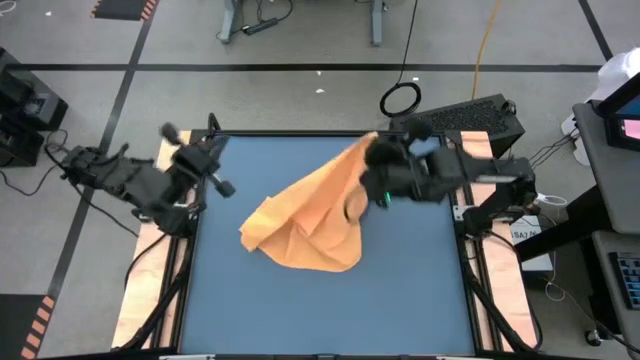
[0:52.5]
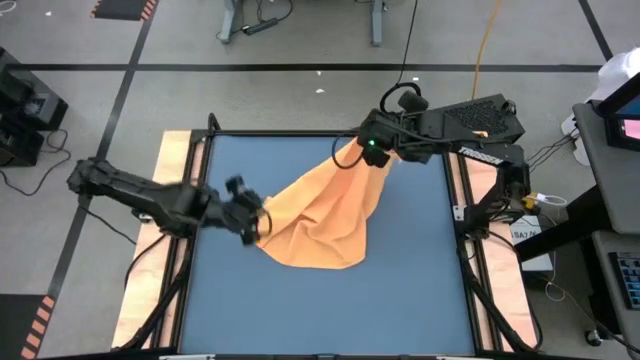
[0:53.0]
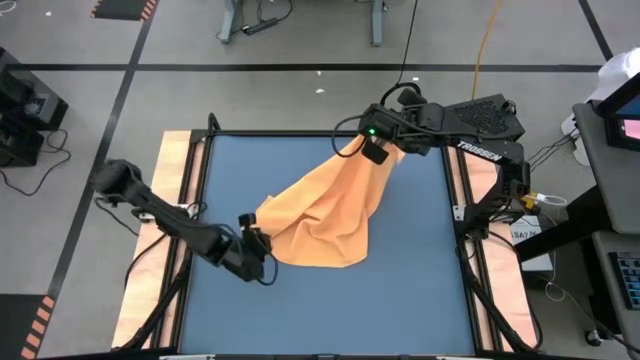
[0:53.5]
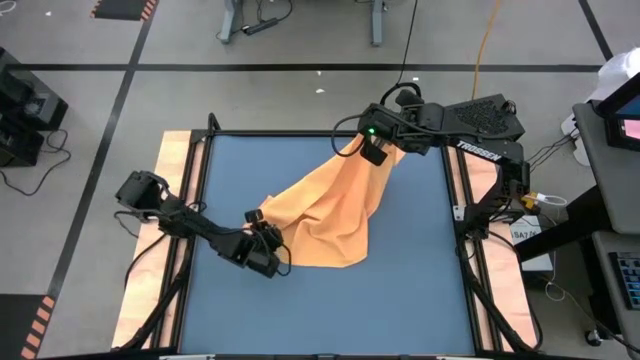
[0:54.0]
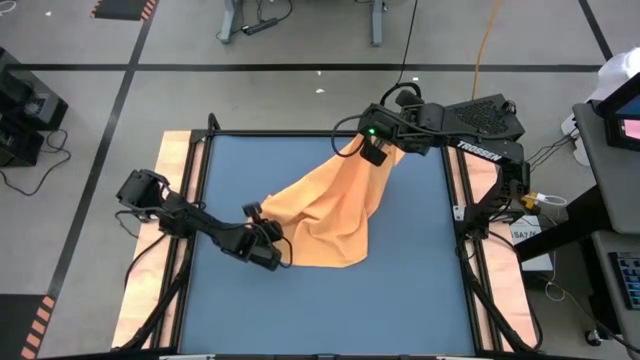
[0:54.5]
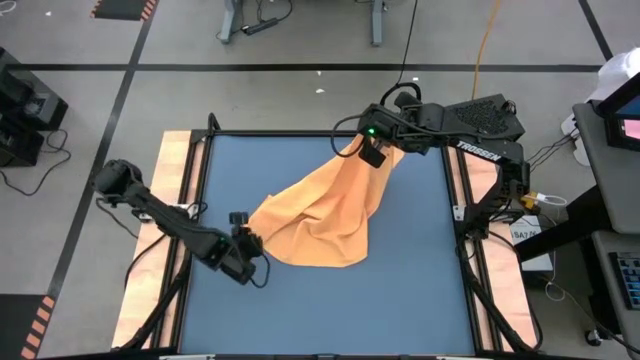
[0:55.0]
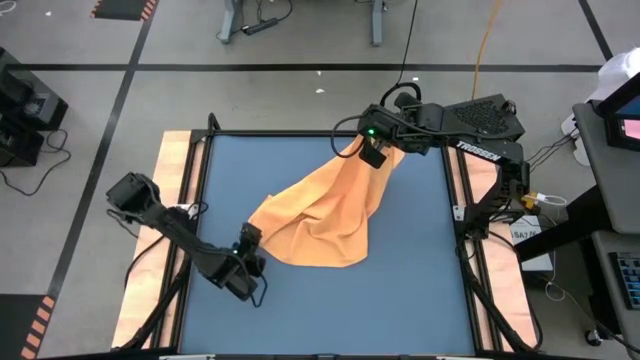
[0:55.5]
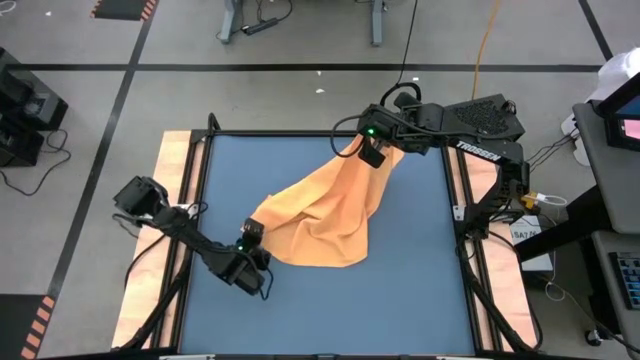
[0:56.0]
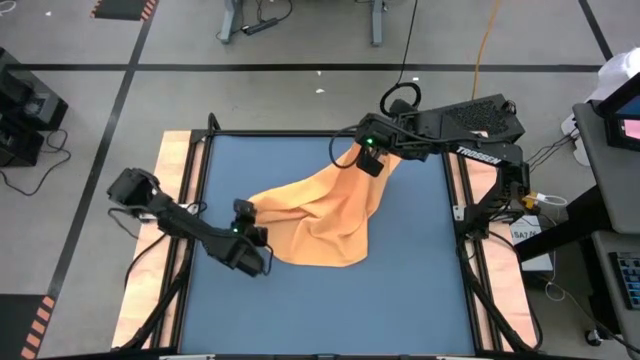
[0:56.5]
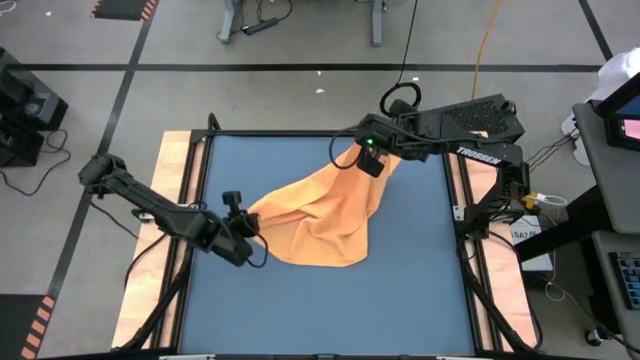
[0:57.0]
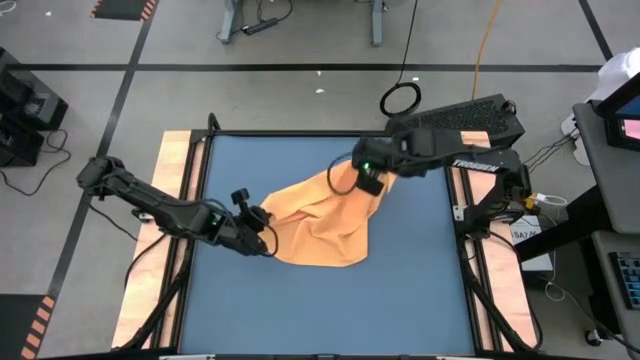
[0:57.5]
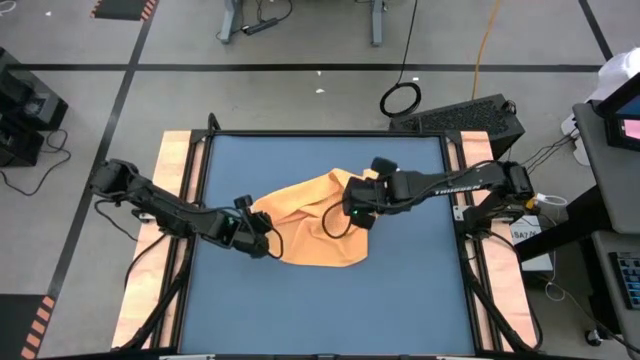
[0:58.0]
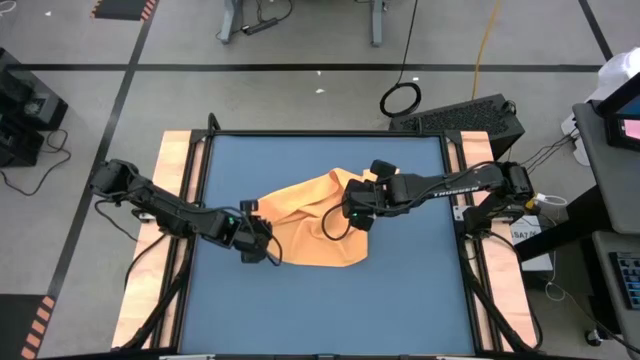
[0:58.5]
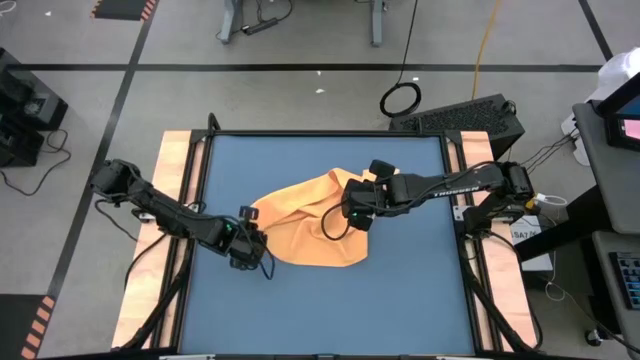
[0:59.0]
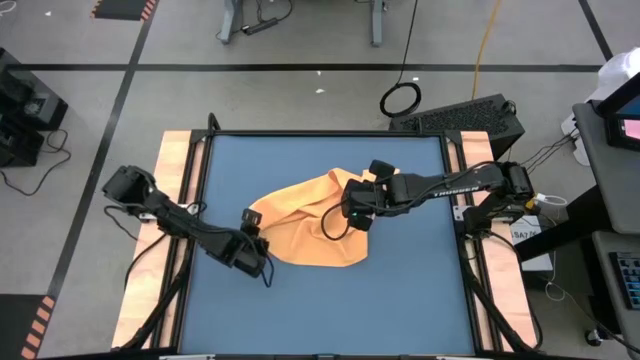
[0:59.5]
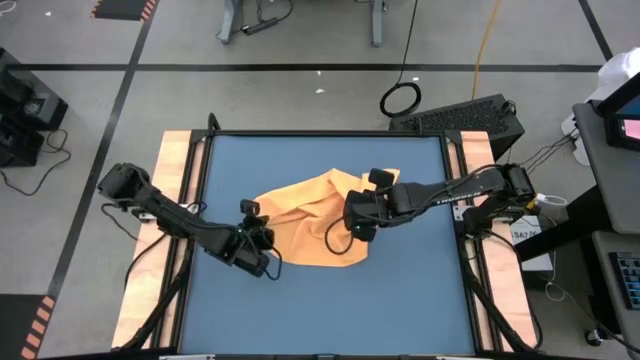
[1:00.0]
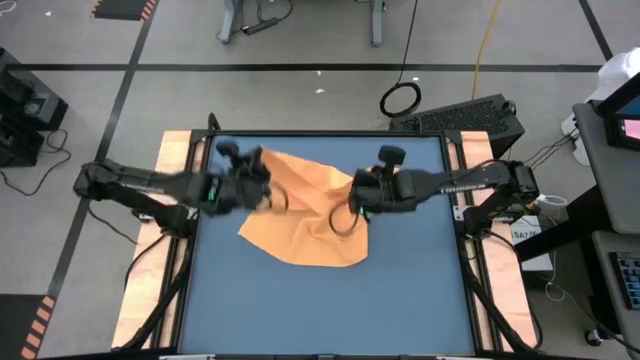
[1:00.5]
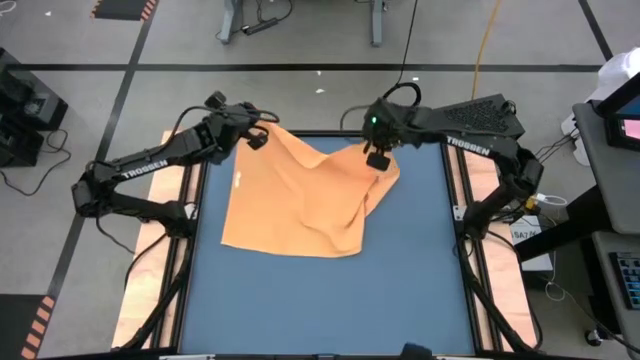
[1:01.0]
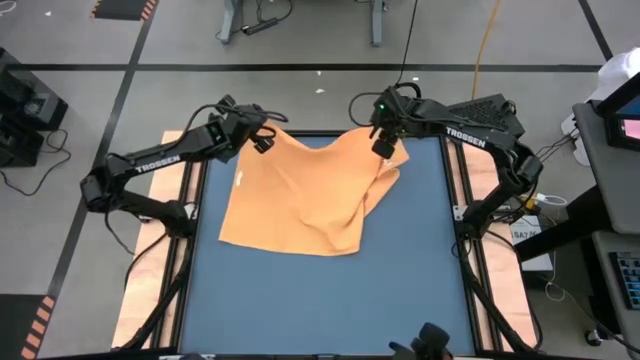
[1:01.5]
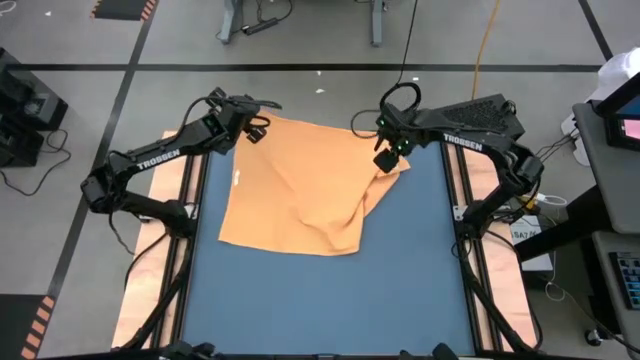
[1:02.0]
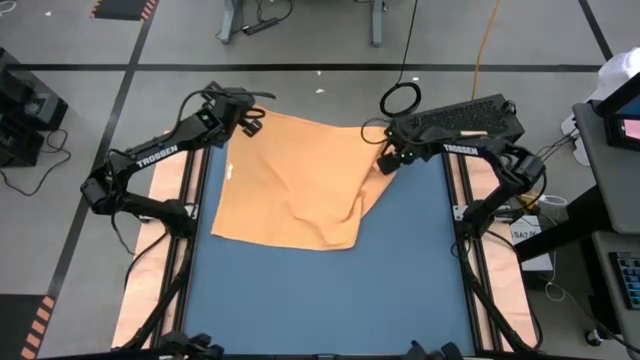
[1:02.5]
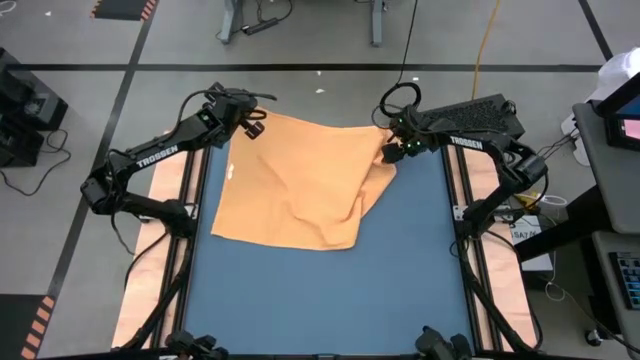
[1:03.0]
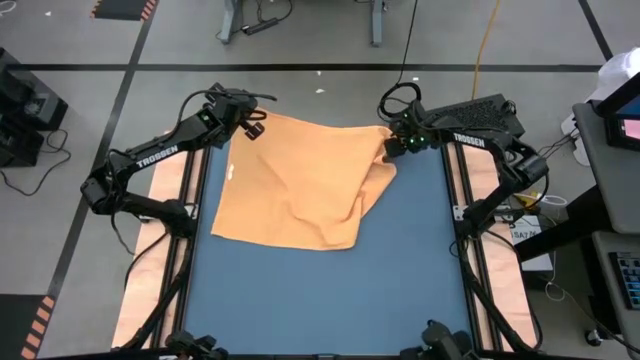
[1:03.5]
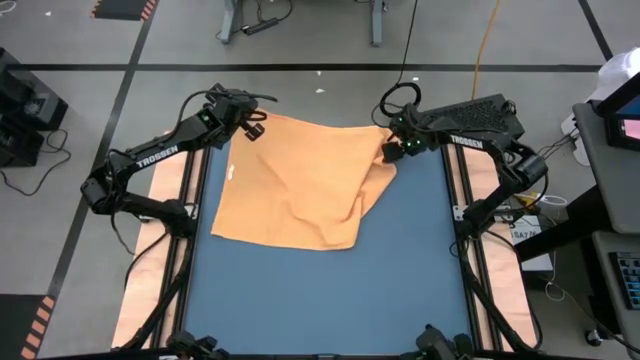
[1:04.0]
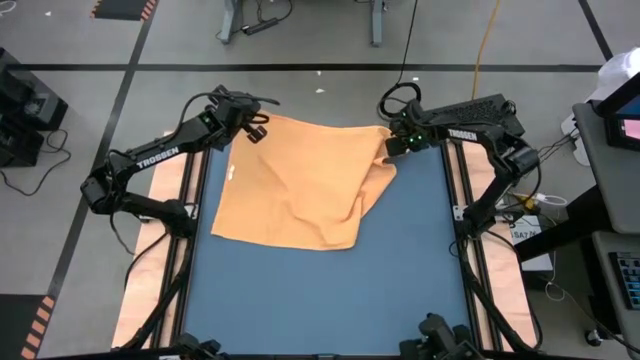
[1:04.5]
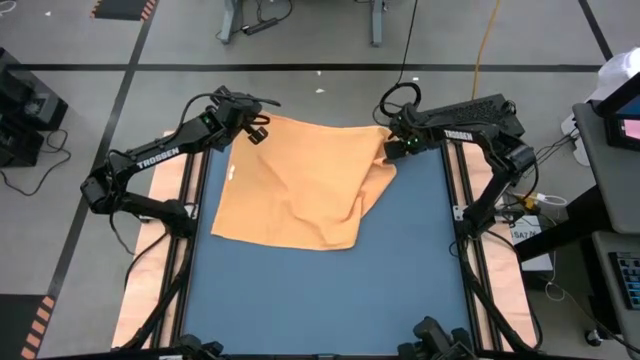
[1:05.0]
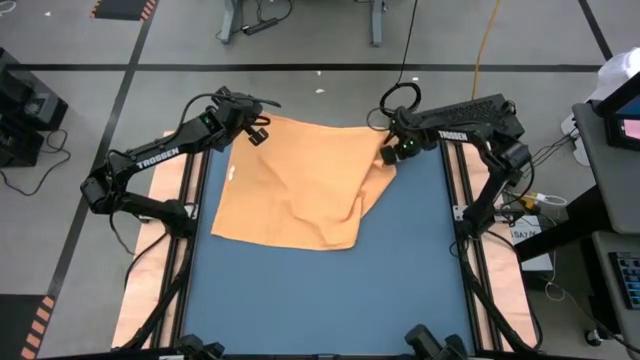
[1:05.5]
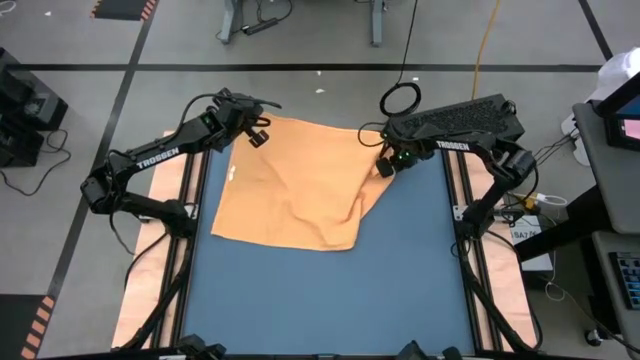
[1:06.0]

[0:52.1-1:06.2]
Task: Roll towel into tight, uniform cylinder
Fold the orange microfiber cloth

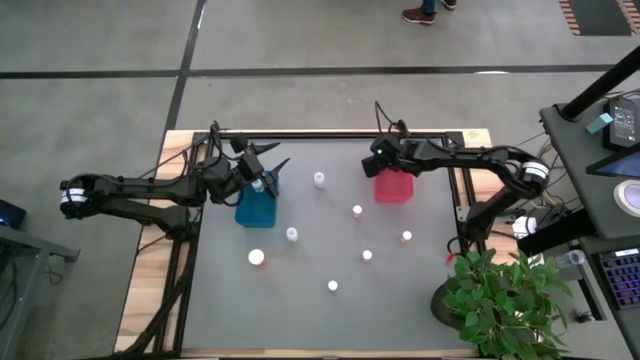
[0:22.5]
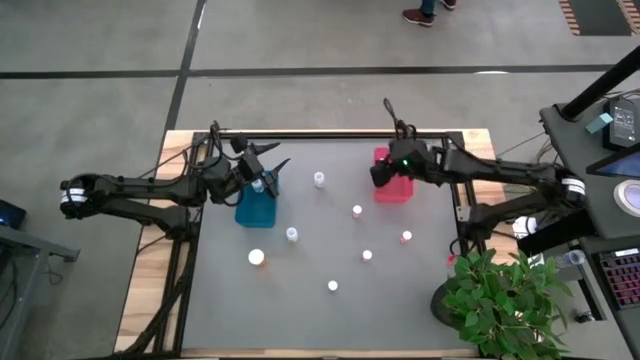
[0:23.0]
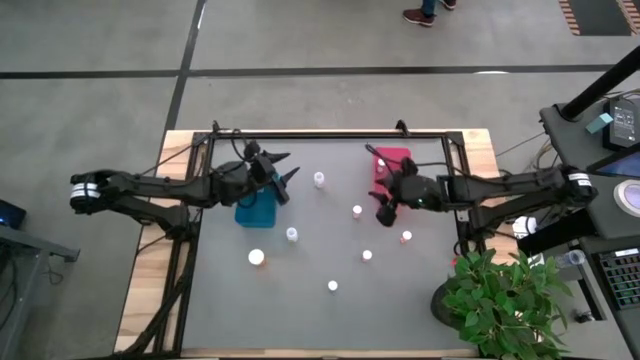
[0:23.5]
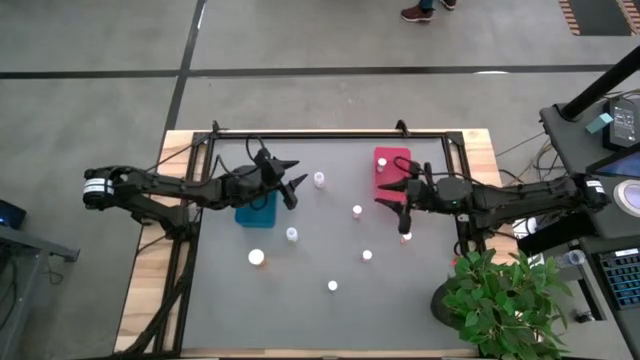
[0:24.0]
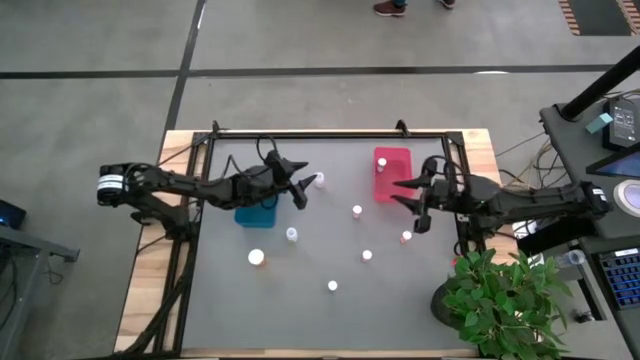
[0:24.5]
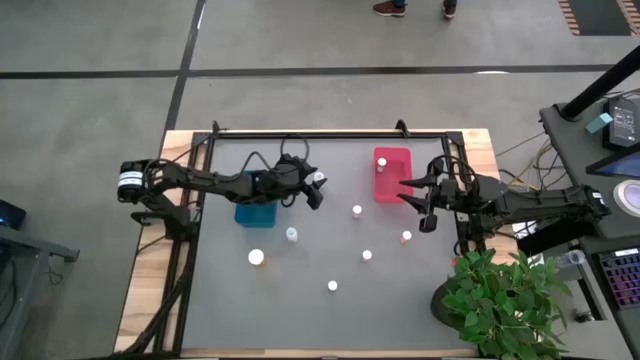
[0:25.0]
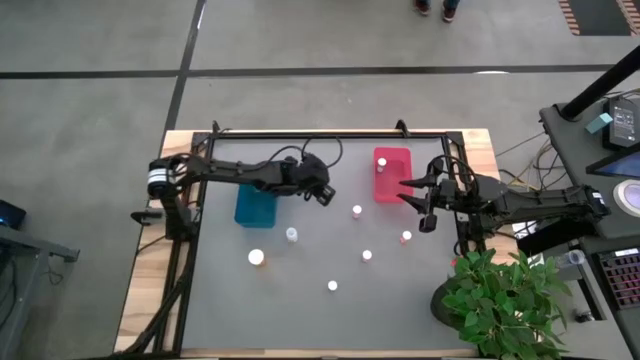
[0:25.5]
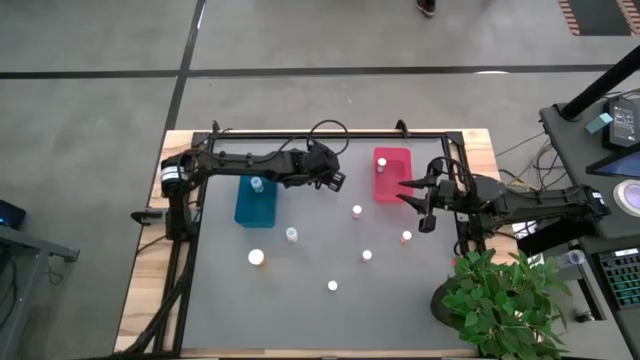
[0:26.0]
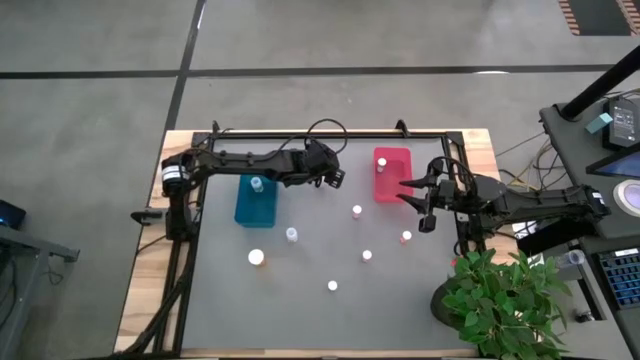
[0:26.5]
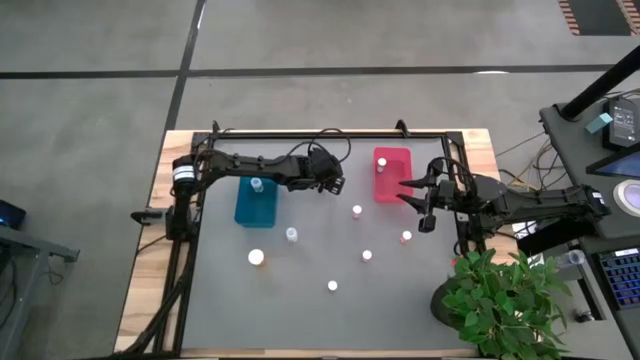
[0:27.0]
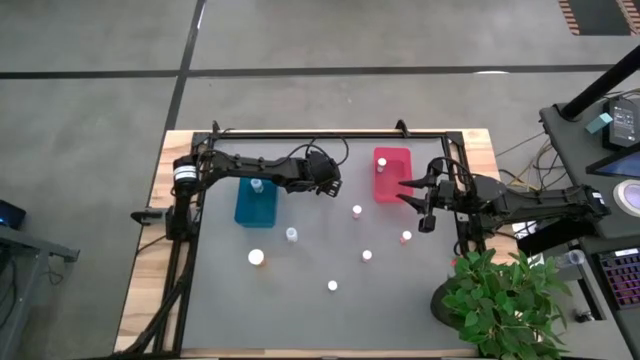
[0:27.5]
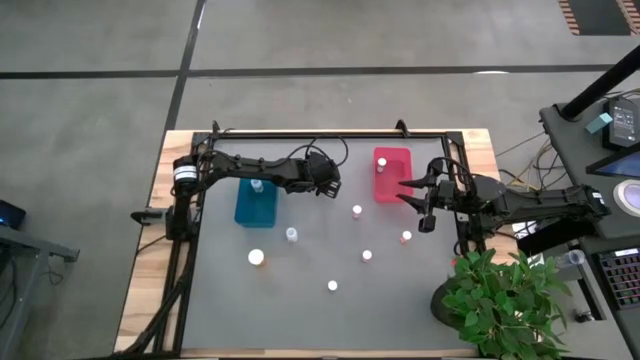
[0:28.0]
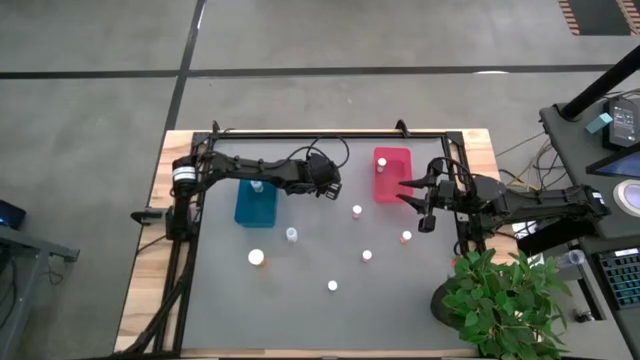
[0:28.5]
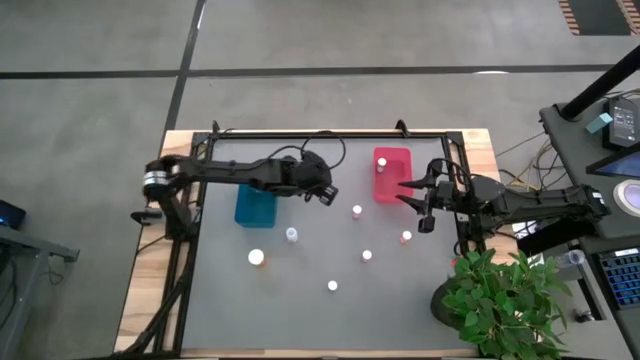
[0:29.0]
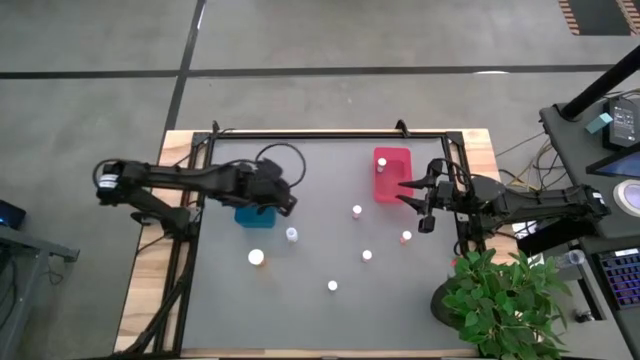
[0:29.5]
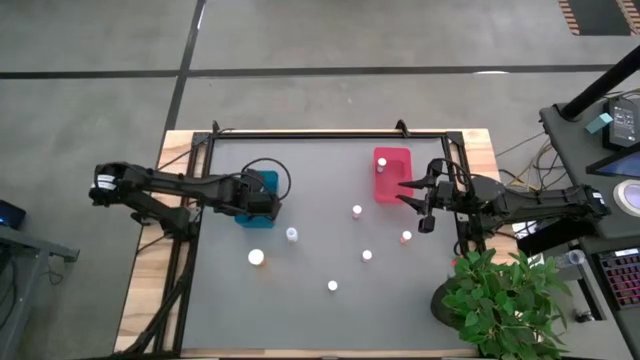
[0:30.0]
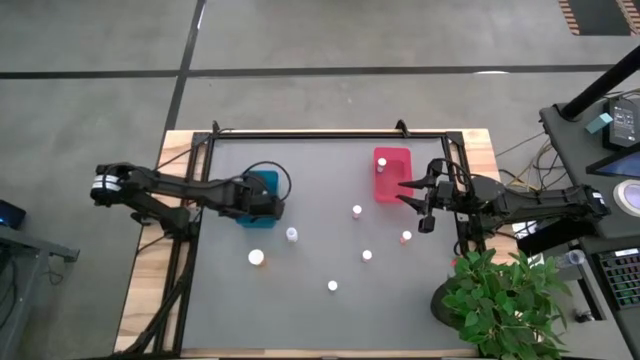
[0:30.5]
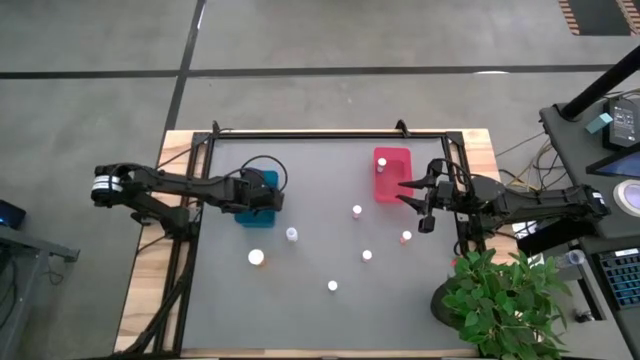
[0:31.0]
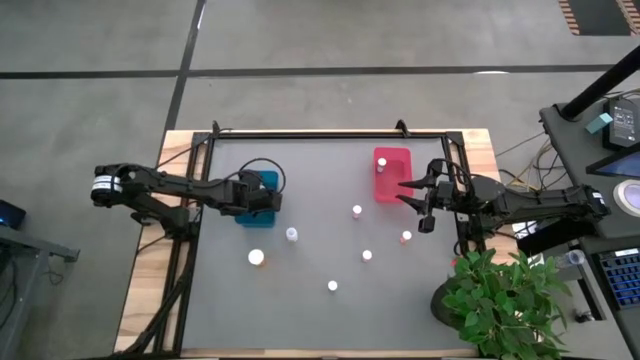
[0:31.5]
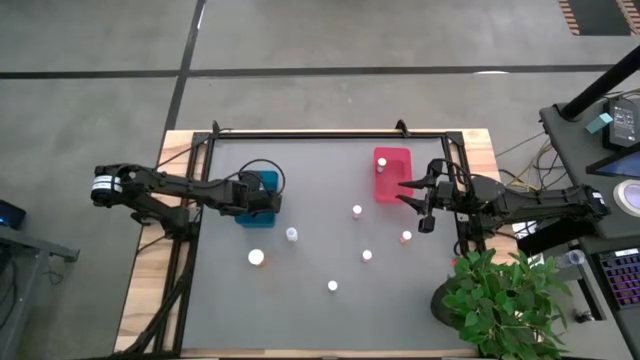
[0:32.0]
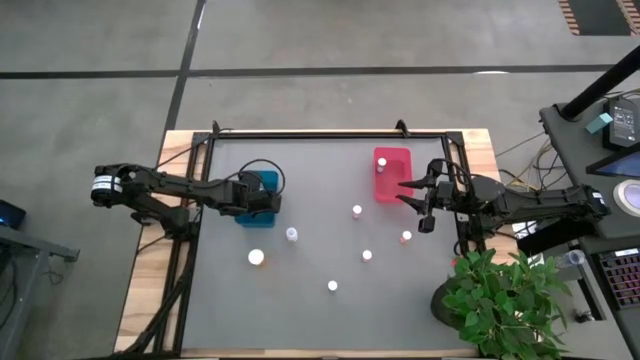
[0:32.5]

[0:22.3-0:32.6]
Task: Pick and place medicine bottles into bin by pill shape (circle, oval)
Put the top transparent capsule bottle into the blue bin
